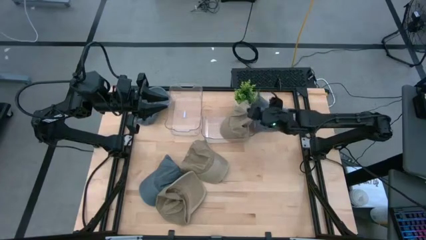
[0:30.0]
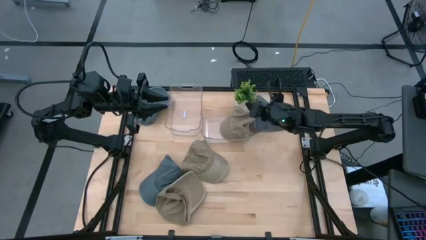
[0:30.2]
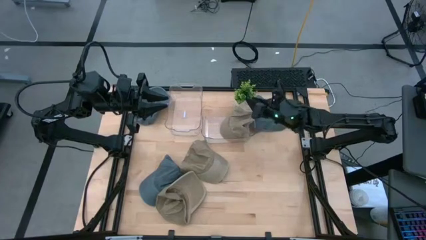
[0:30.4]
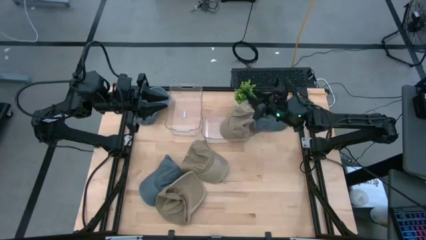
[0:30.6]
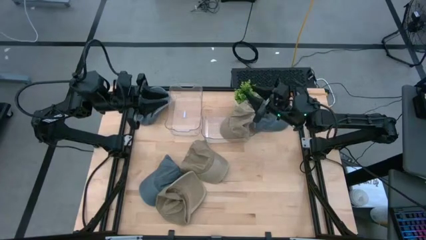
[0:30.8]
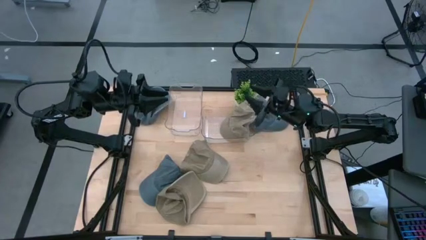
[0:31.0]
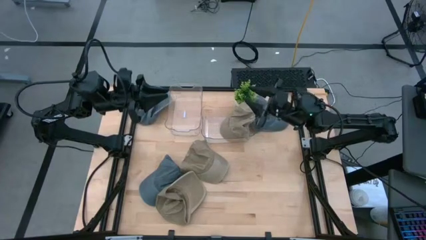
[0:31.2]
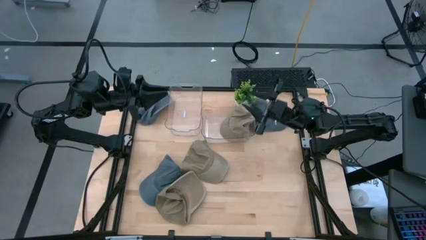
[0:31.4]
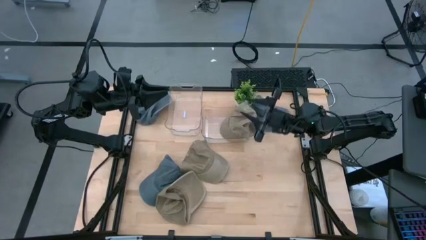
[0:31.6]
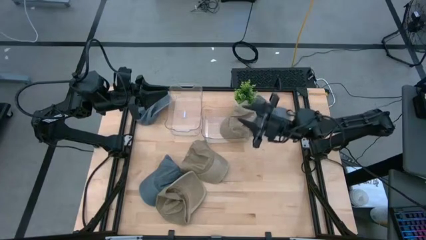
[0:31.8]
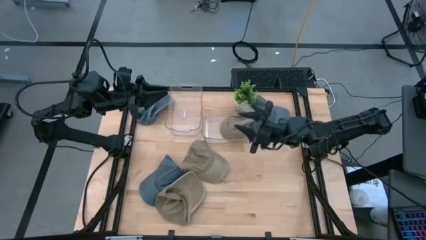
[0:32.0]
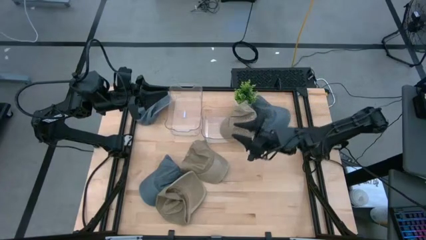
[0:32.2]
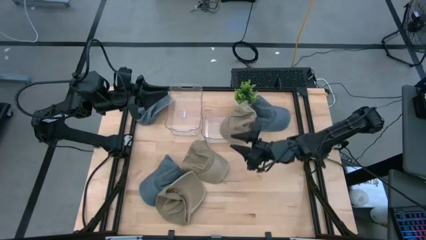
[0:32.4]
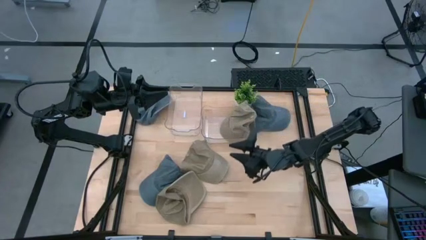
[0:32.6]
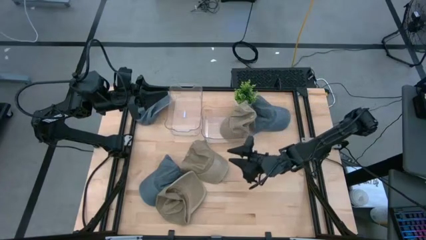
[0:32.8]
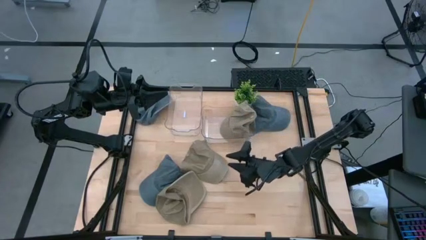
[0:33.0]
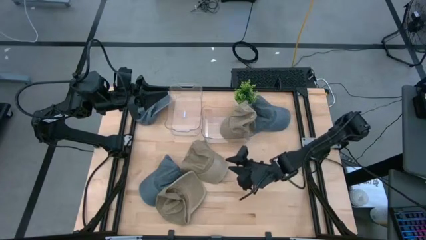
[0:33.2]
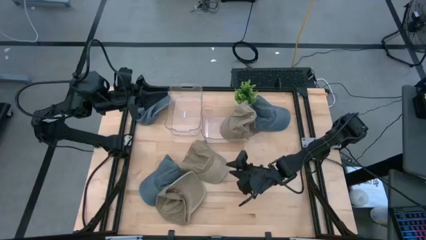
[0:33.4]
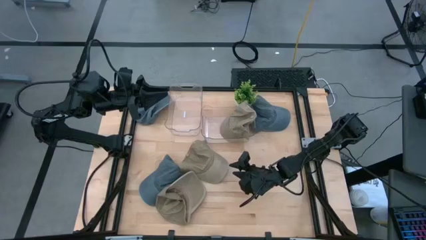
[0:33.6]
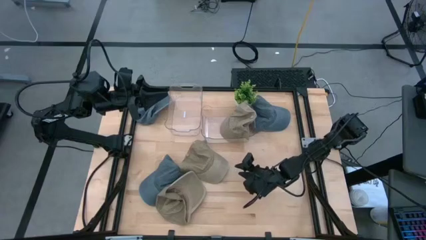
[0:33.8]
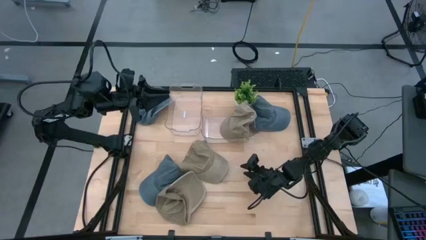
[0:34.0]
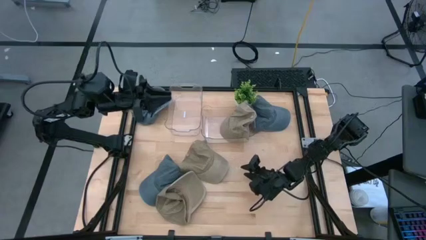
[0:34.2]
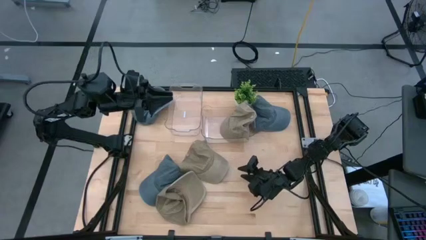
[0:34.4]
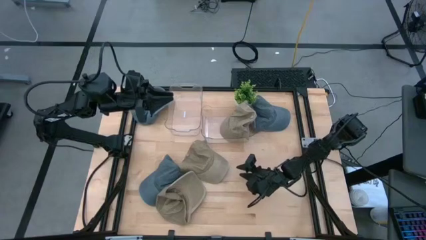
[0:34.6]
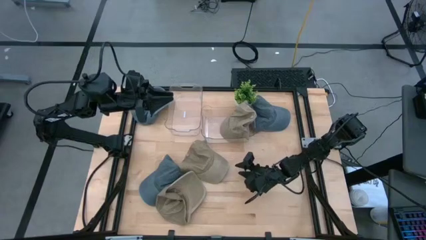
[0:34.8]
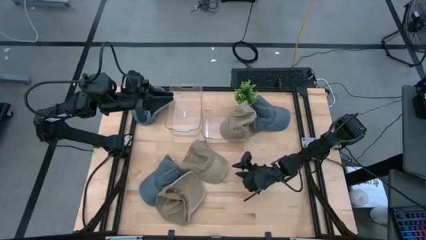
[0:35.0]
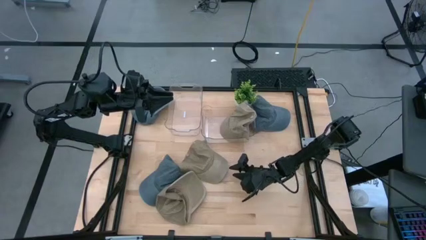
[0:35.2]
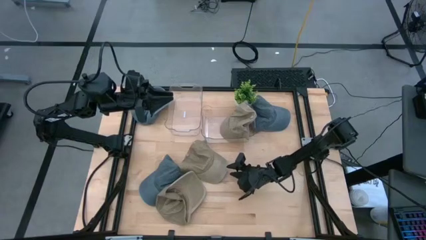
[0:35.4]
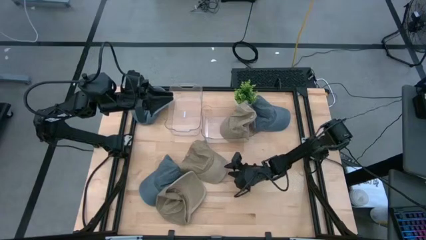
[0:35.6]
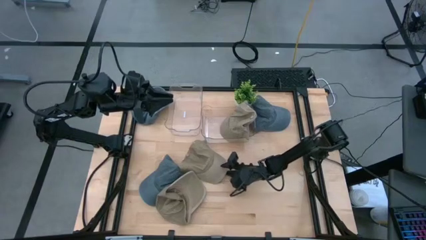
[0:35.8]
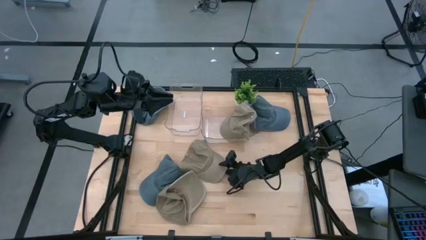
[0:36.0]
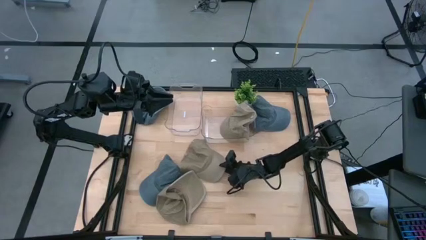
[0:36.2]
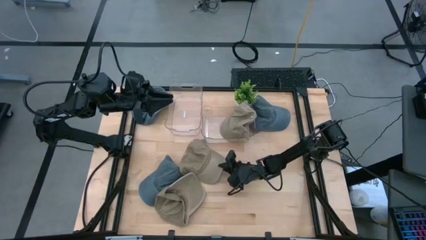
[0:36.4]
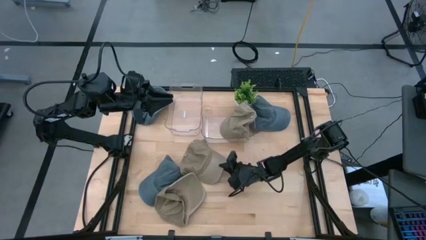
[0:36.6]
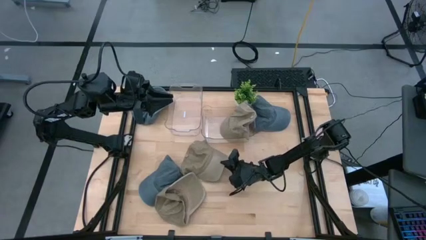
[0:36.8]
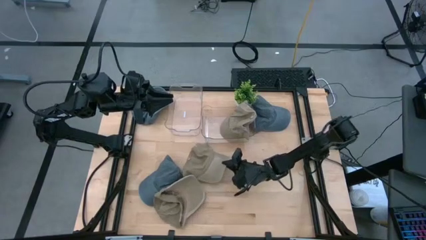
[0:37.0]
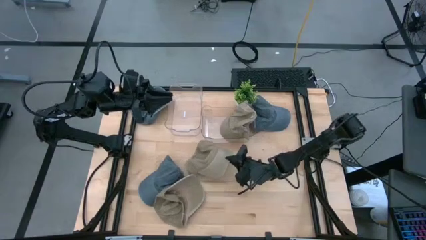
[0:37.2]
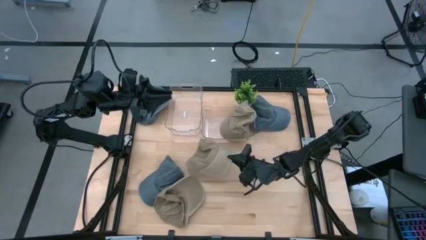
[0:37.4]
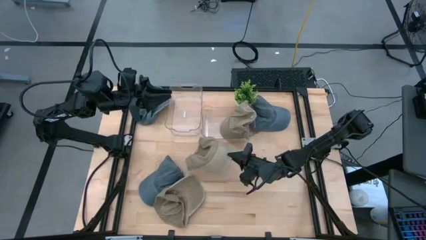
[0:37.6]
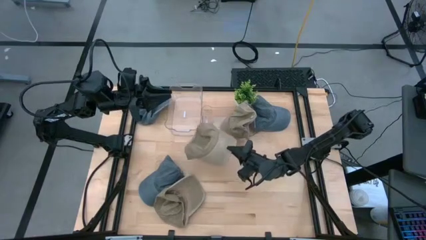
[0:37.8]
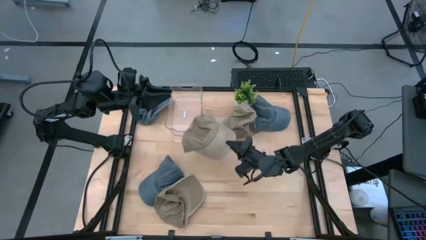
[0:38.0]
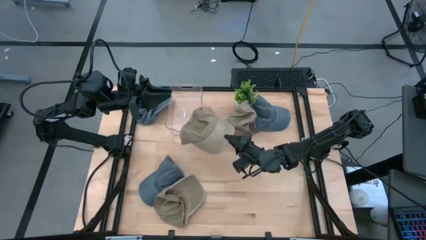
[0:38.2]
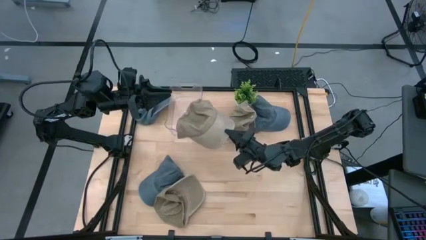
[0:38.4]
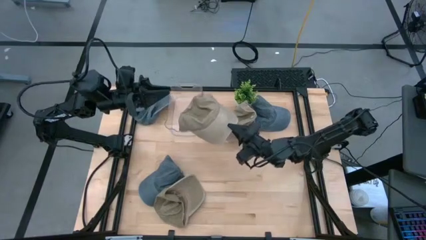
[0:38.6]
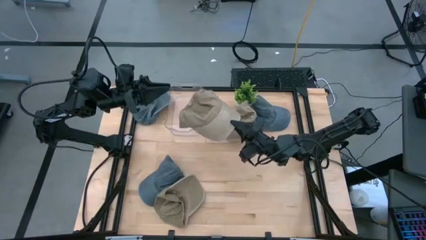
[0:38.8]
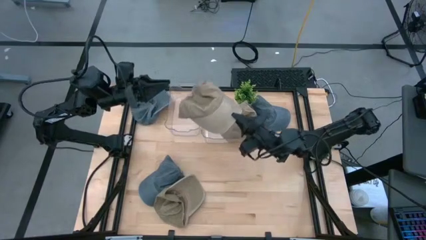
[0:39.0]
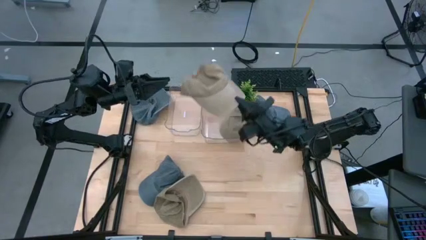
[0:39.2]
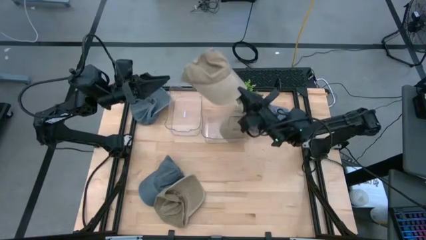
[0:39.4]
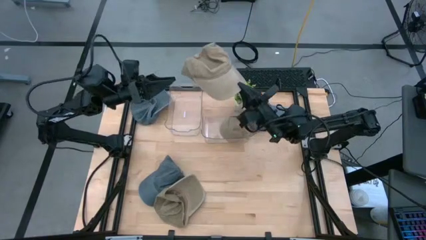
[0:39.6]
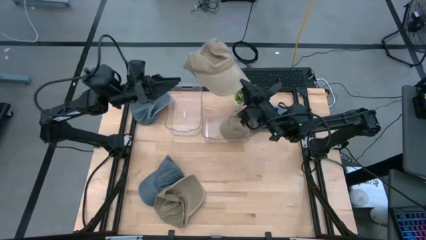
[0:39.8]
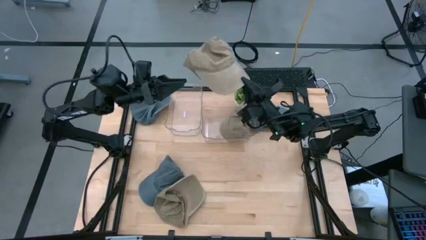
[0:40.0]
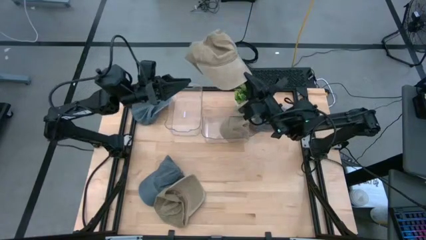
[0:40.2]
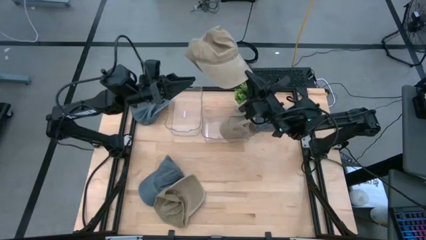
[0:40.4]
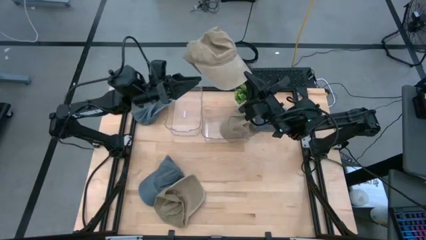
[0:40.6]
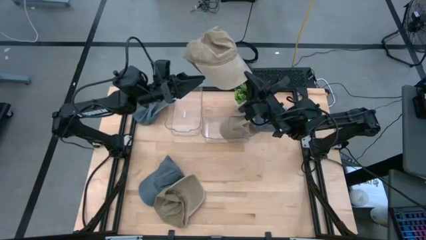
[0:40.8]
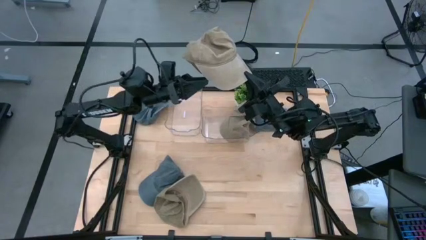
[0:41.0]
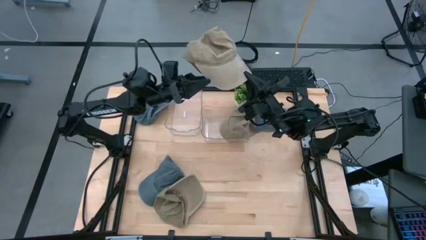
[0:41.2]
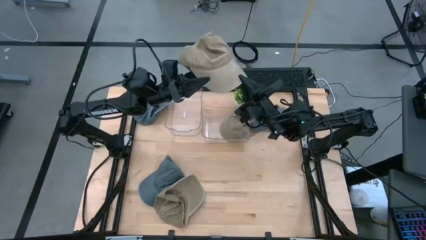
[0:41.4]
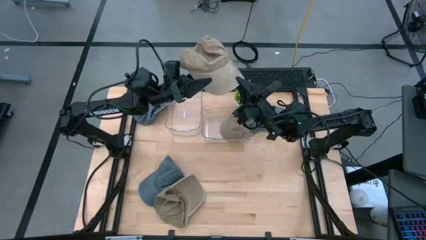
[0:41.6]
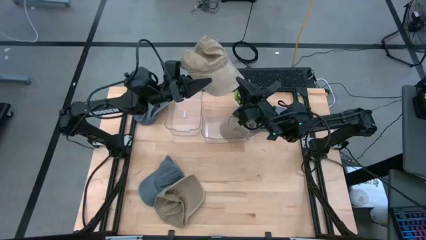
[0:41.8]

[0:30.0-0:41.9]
Task: Pick & Place hat
Put the top brown cap into the right transparent bin
